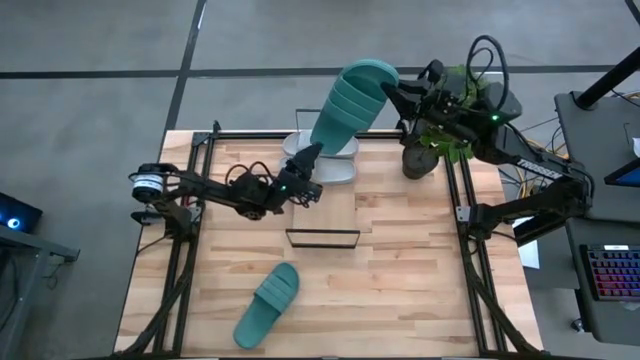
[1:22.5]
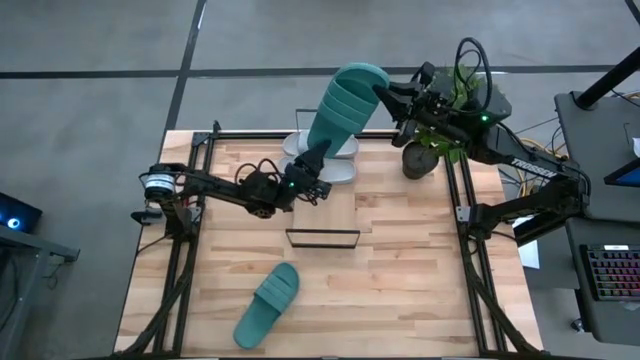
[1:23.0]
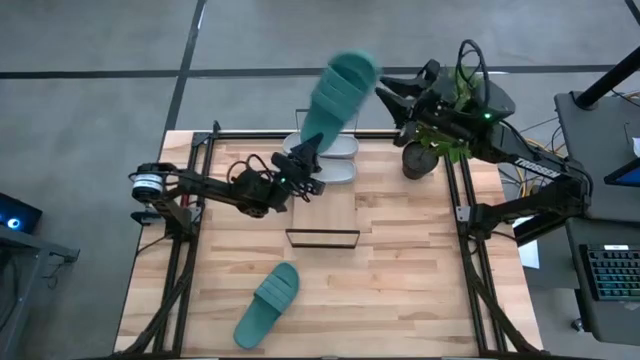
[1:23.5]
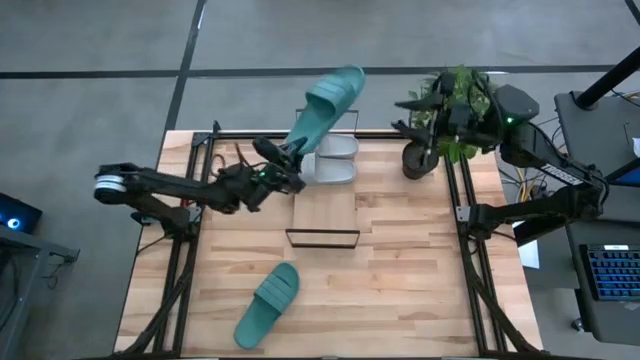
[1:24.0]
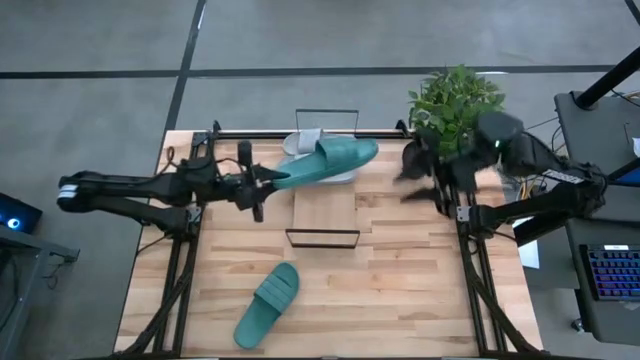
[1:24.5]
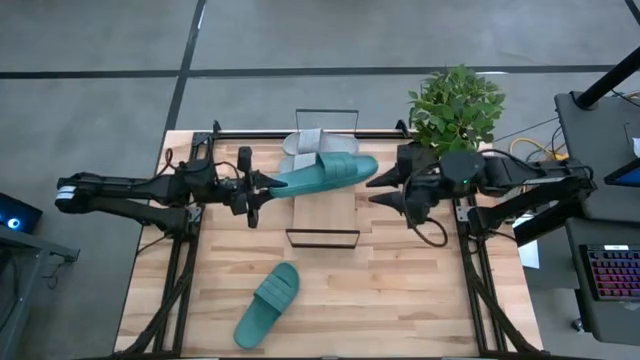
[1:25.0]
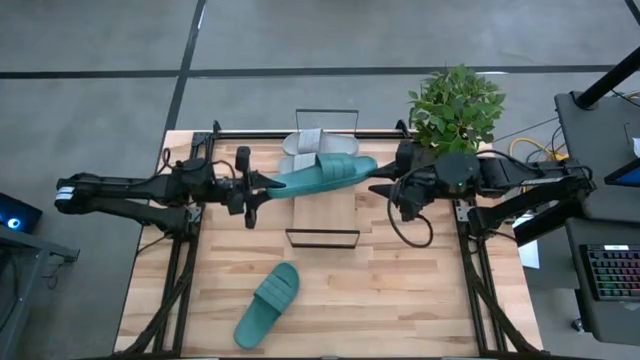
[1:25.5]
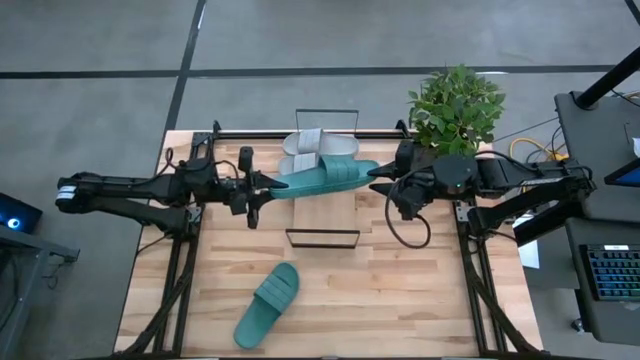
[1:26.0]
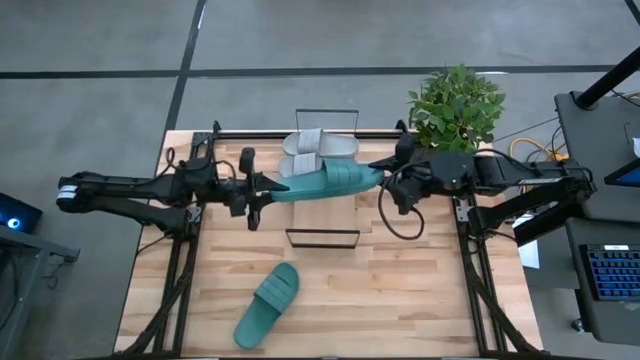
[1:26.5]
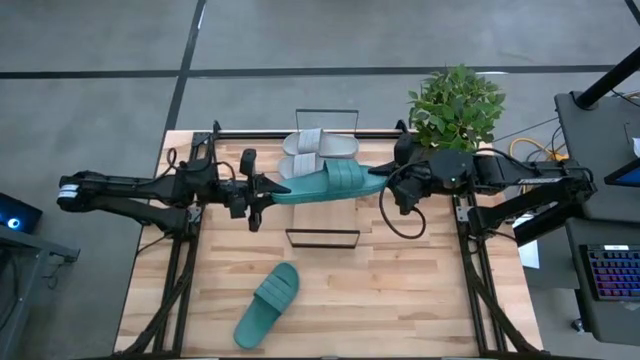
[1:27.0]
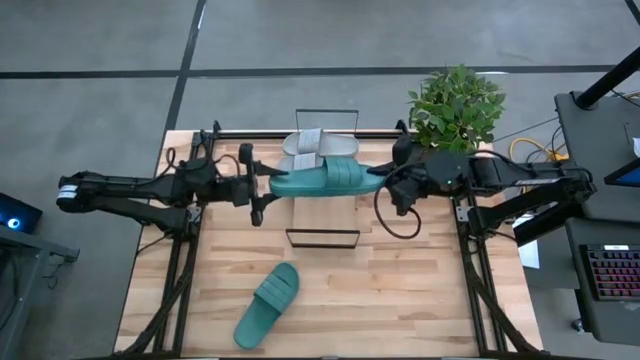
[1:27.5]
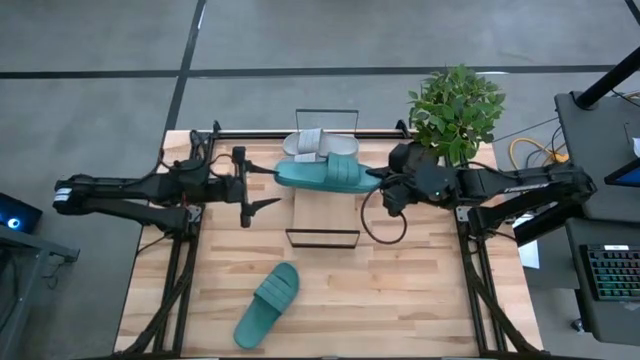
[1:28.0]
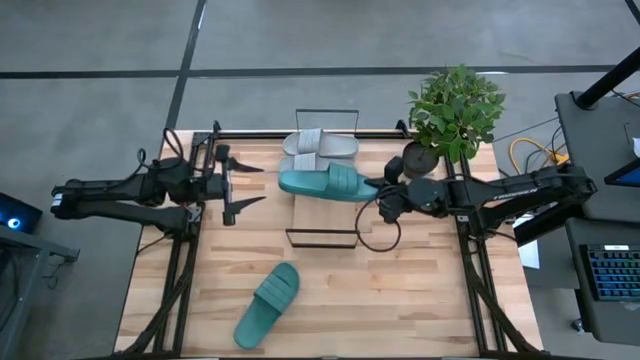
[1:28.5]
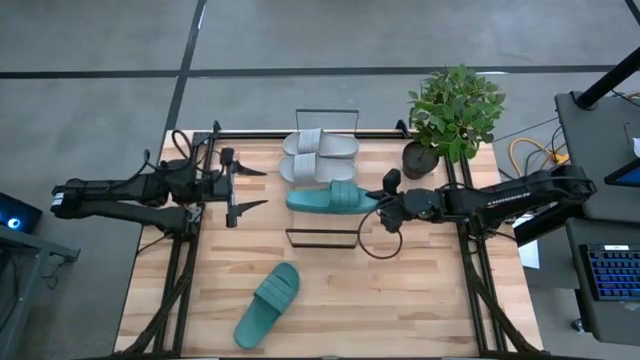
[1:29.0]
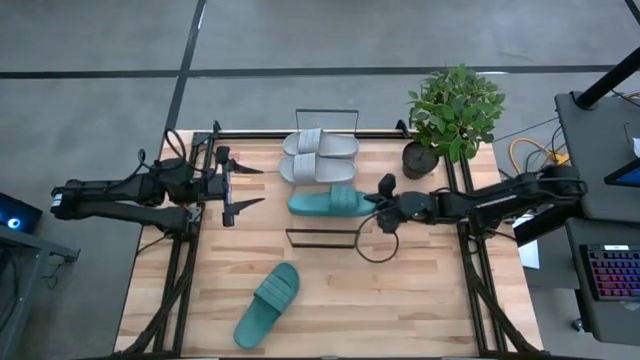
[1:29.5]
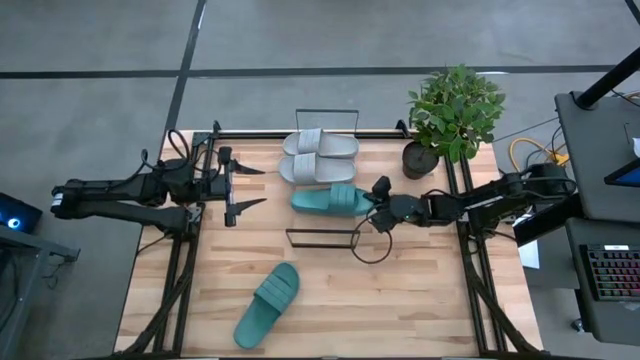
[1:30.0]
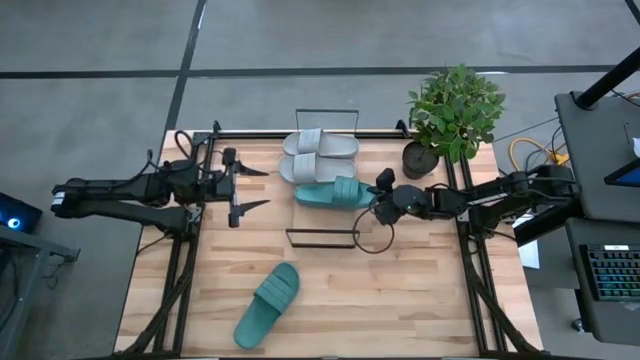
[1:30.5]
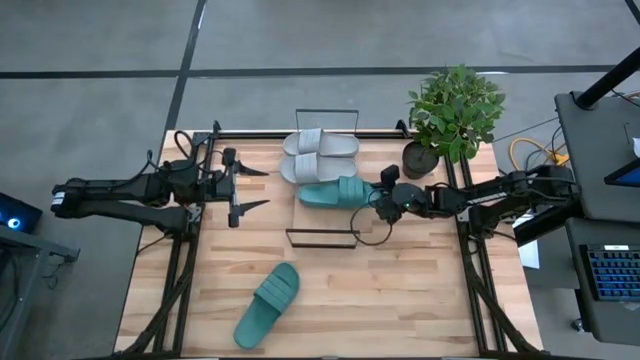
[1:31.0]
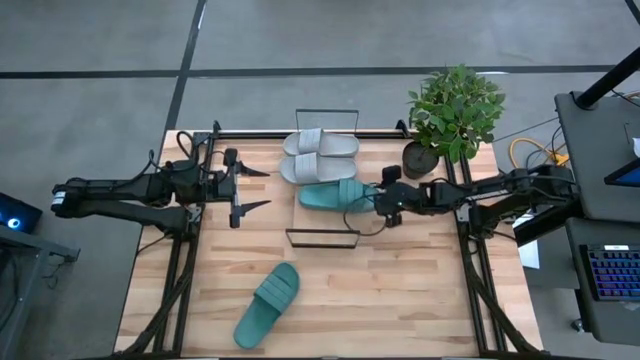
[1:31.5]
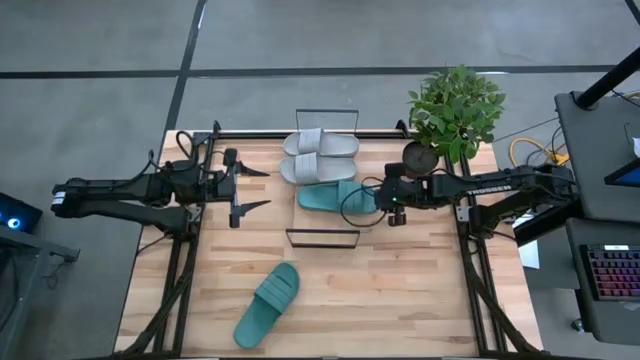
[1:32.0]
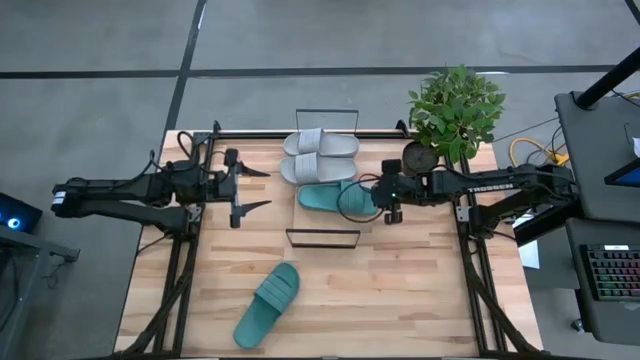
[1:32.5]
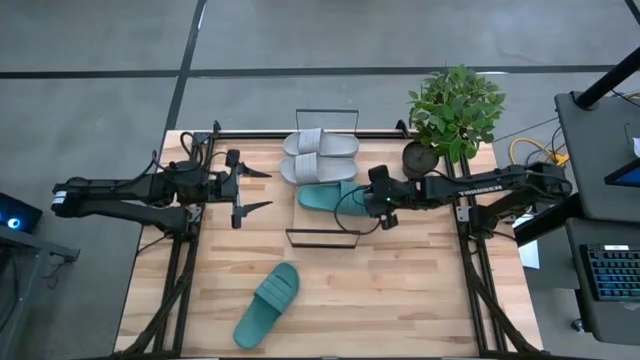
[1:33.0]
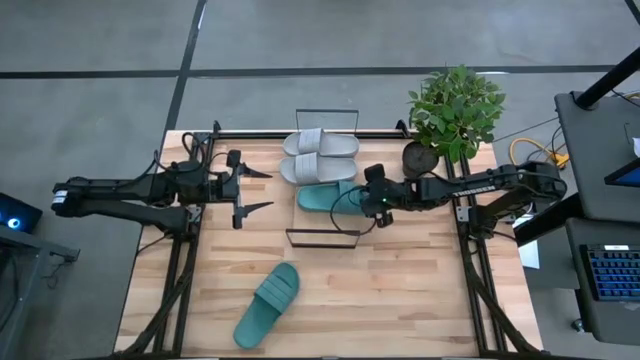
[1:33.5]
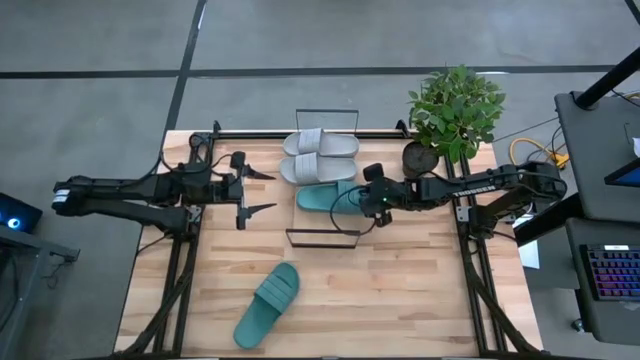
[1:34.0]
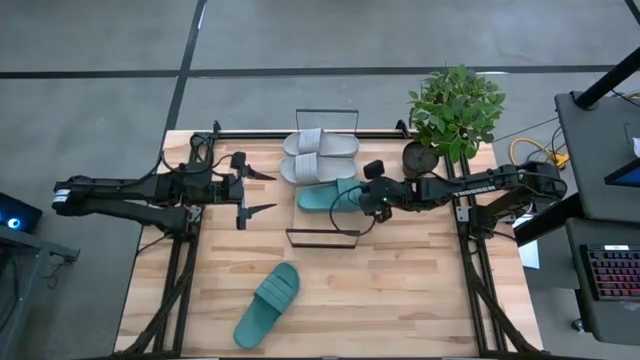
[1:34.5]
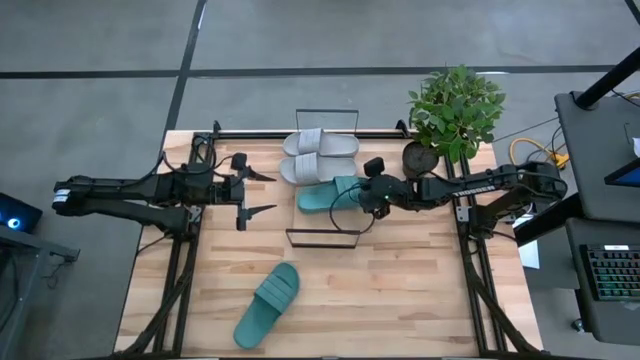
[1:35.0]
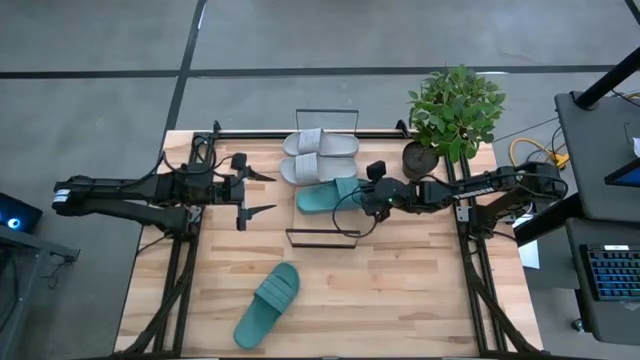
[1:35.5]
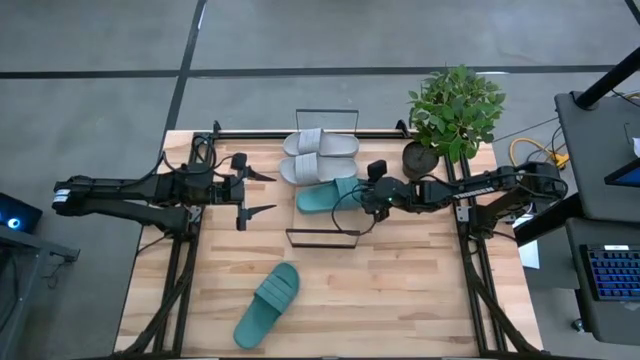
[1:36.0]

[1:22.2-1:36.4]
Task: Pick and place slides into the shelf
Put the left green slipper on the shelf

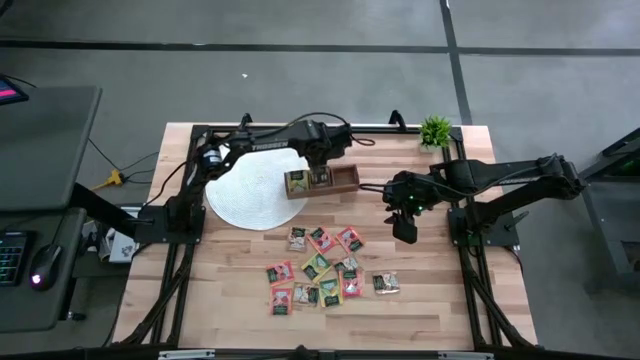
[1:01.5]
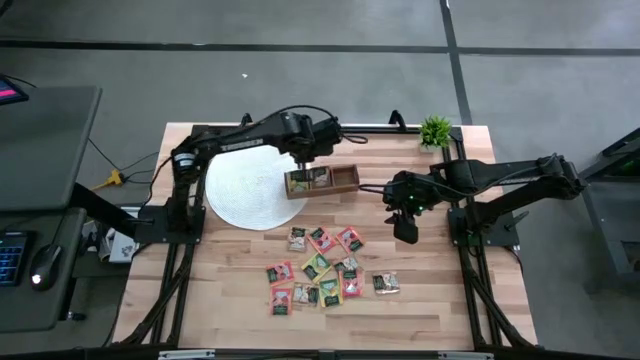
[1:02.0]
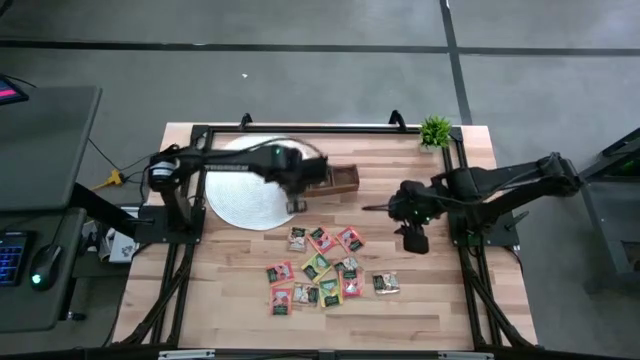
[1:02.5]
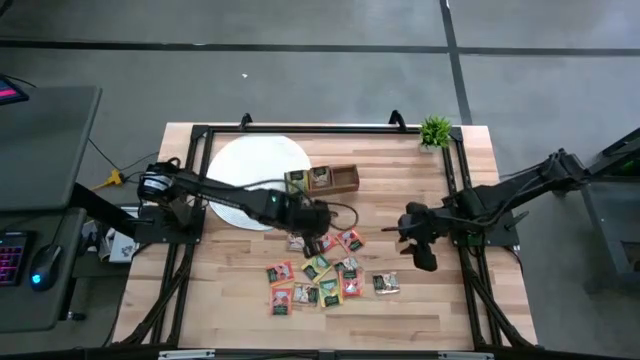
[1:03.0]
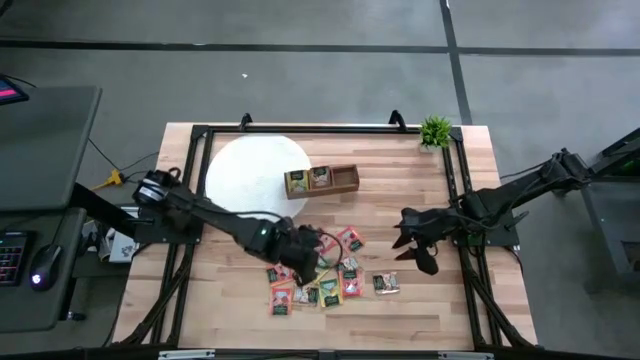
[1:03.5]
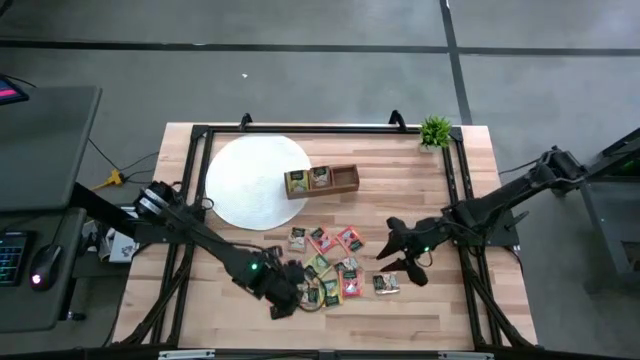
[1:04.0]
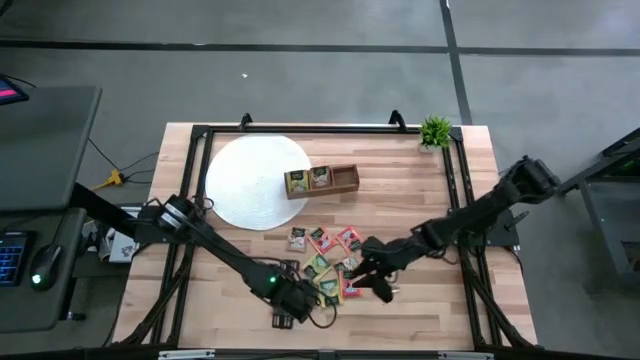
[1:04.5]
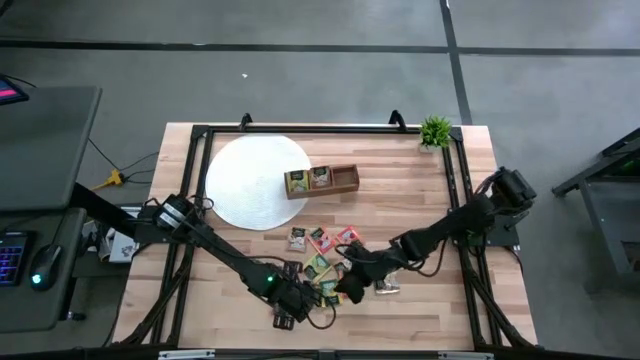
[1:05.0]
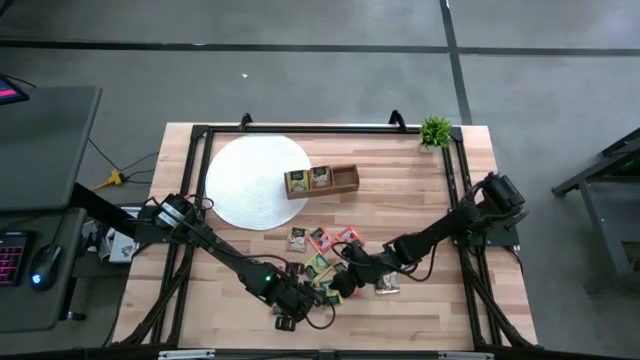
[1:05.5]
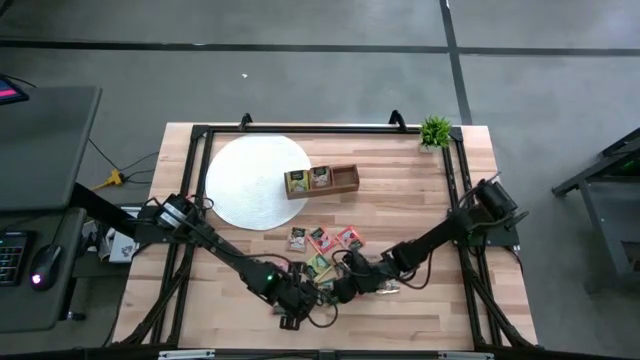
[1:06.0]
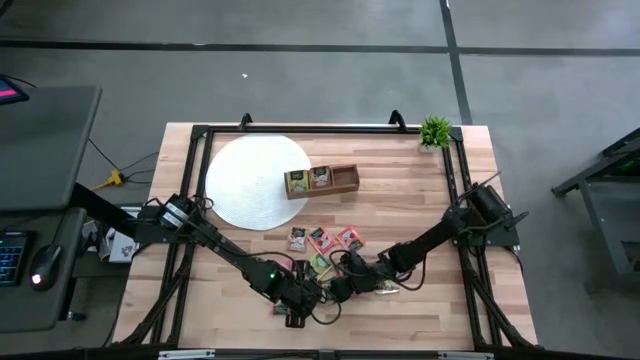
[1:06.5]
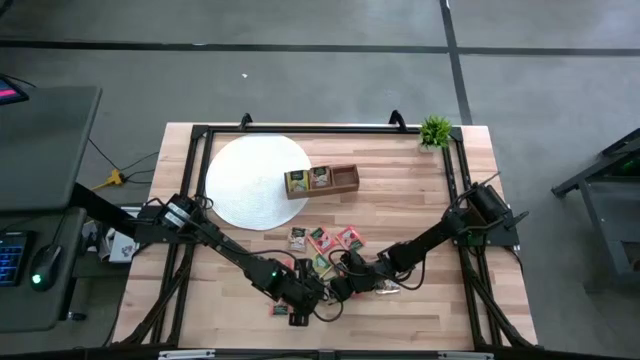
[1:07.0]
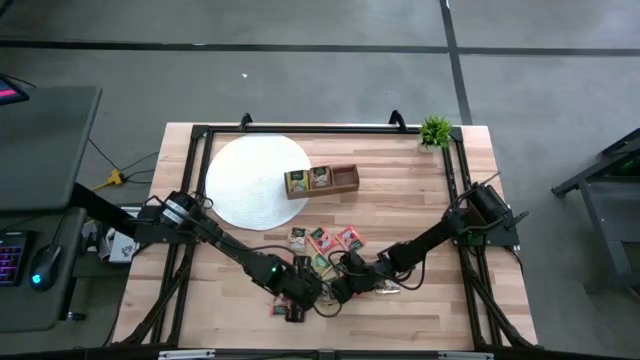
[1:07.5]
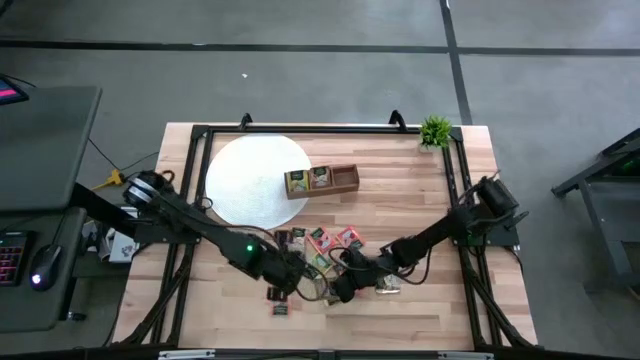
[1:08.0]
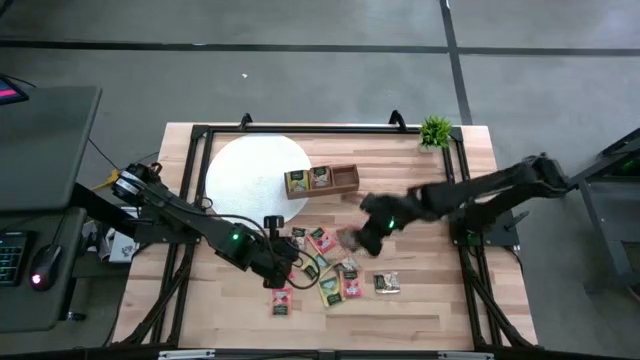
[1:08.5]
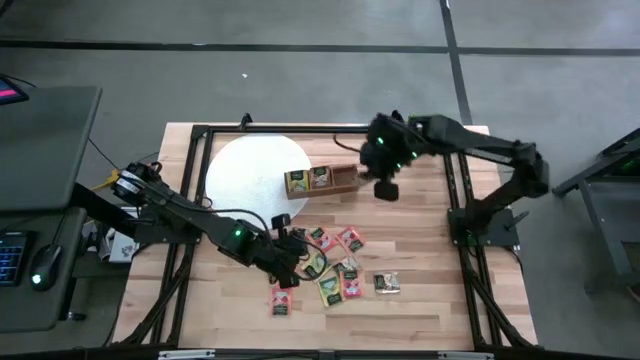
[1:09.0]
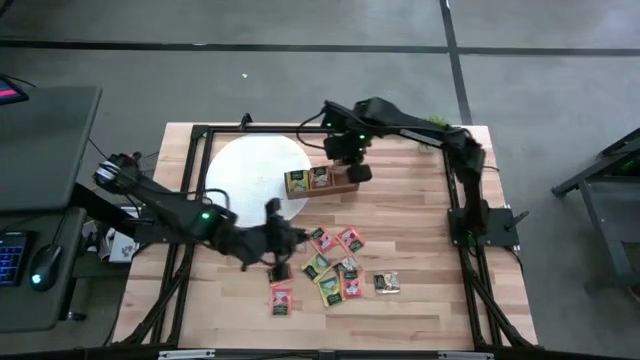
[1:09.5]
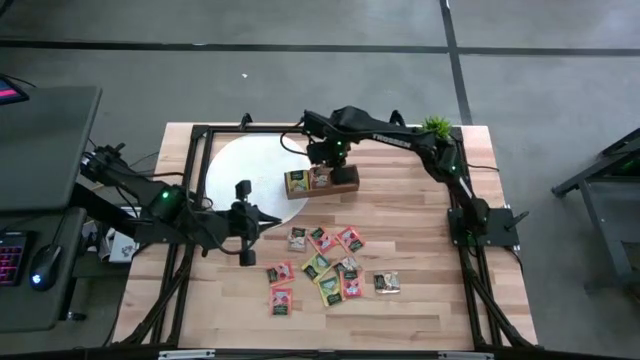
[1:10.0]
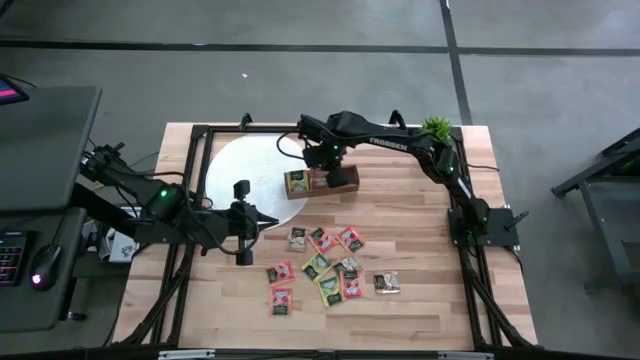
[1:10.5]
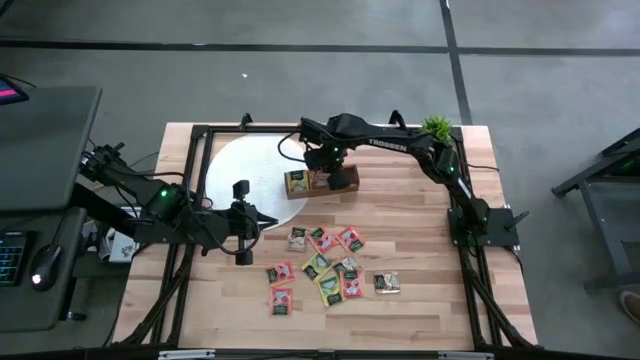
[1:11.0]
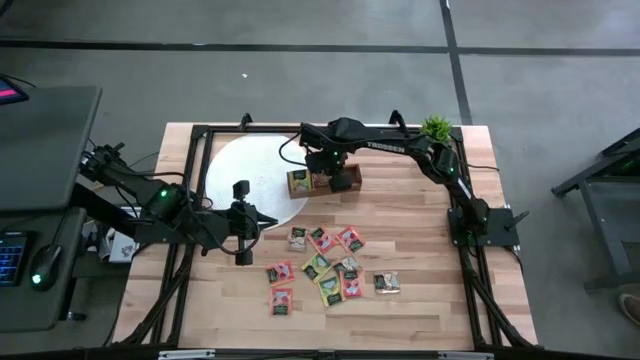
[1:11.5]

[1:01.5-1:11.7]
Task: Pick & Place Tea
Put the brown tea bag into the middle compartment of the wooden organizer
